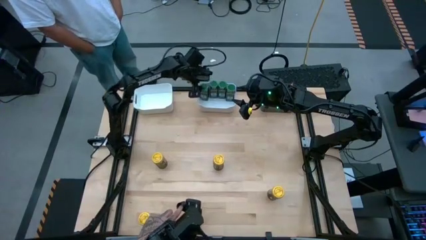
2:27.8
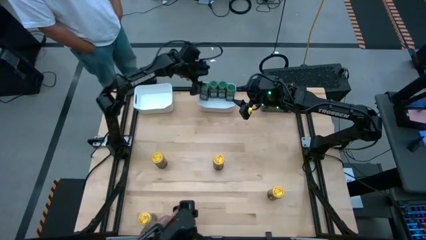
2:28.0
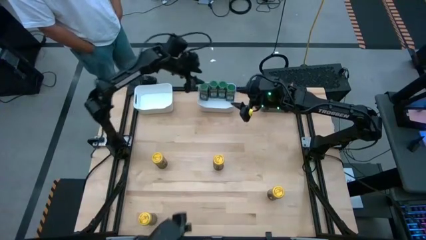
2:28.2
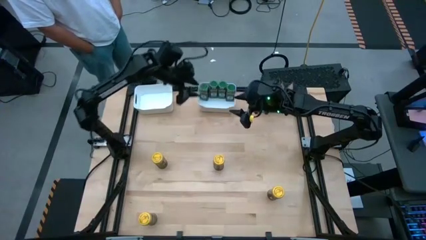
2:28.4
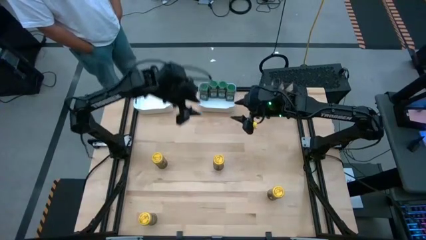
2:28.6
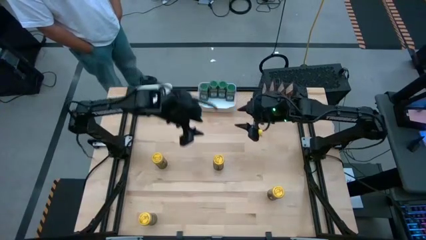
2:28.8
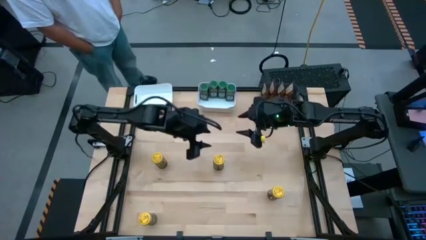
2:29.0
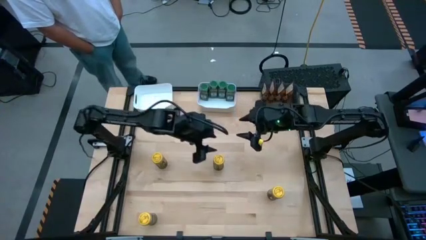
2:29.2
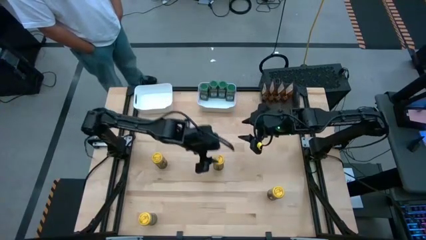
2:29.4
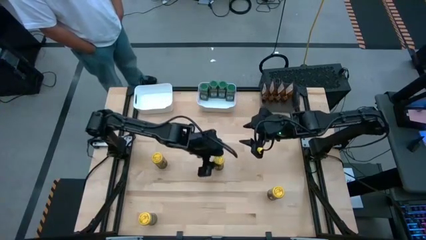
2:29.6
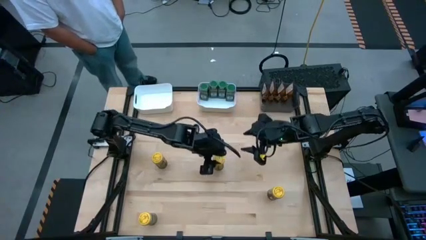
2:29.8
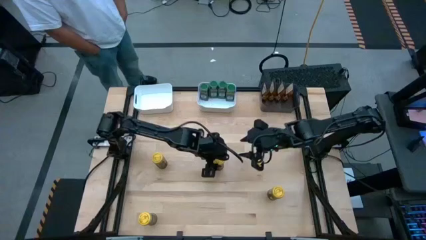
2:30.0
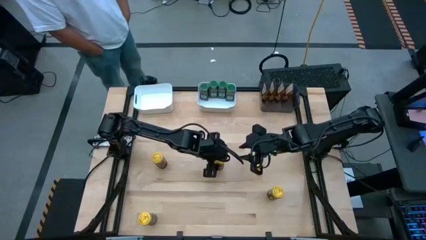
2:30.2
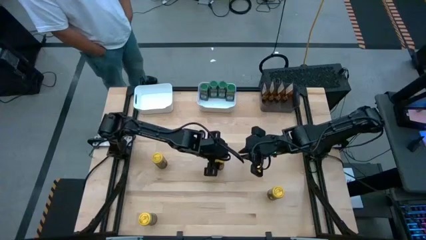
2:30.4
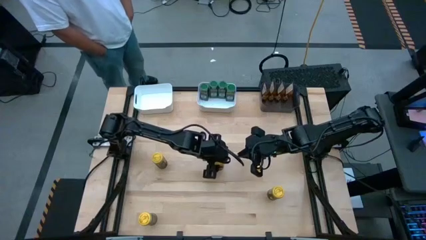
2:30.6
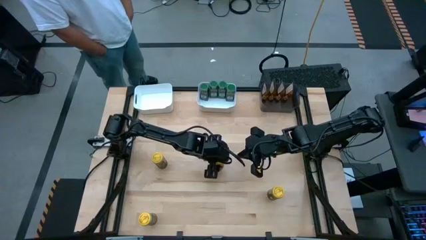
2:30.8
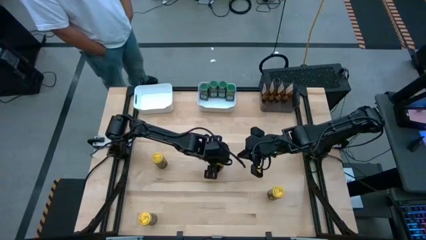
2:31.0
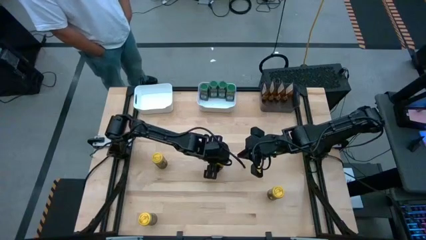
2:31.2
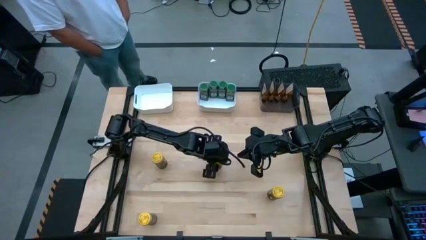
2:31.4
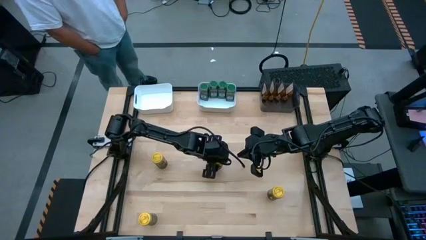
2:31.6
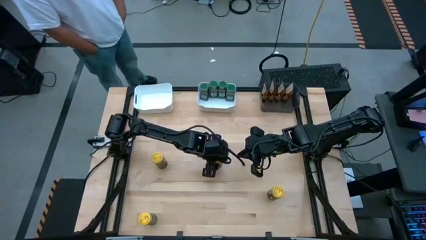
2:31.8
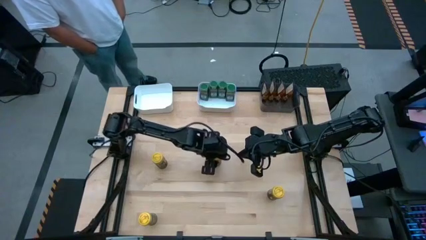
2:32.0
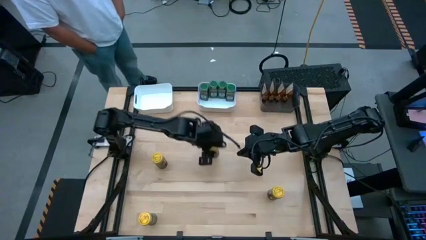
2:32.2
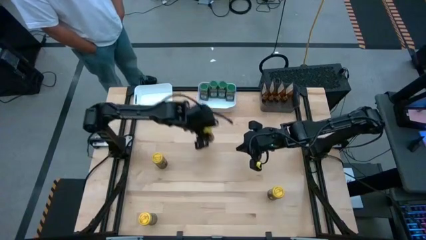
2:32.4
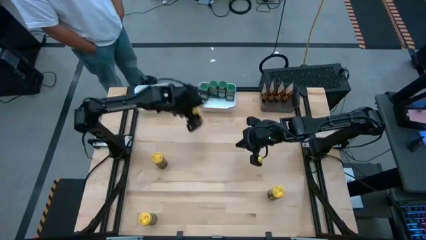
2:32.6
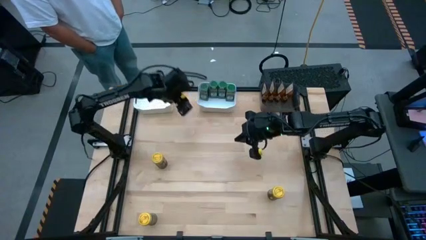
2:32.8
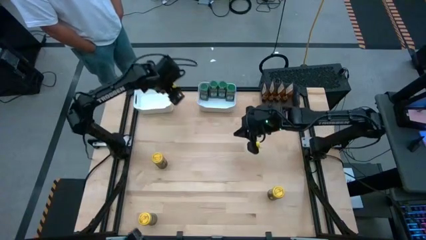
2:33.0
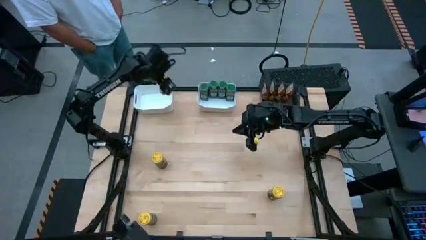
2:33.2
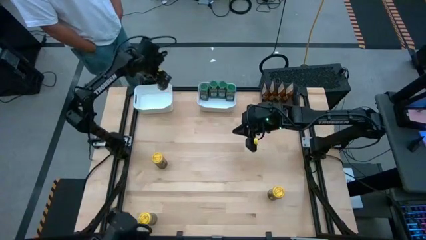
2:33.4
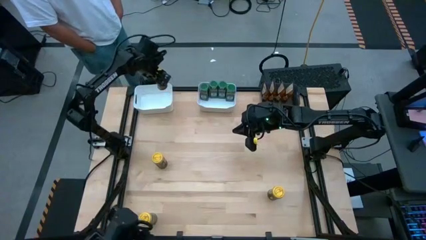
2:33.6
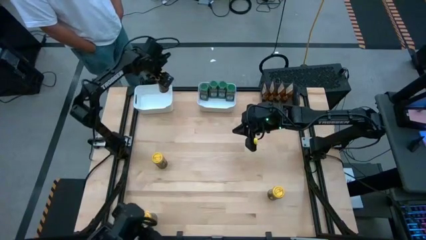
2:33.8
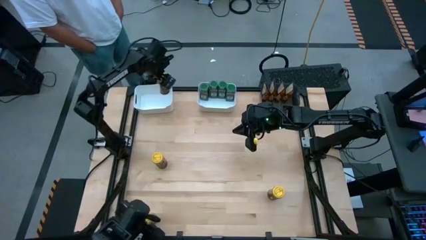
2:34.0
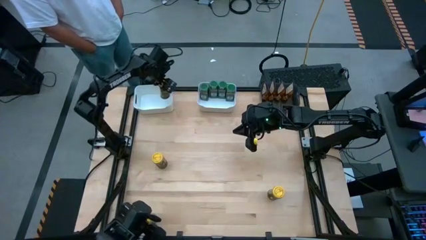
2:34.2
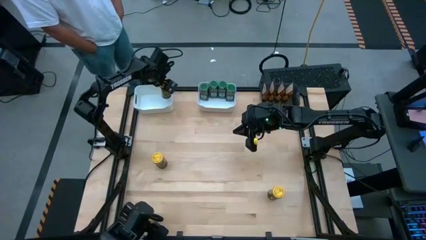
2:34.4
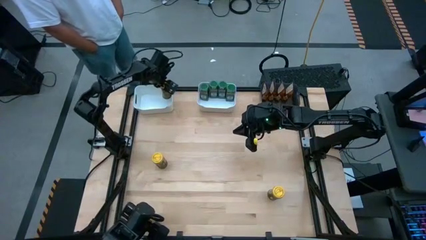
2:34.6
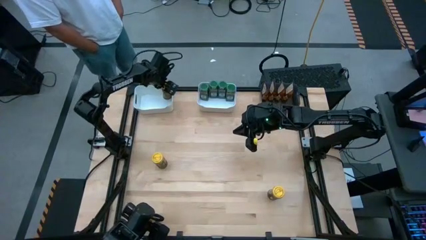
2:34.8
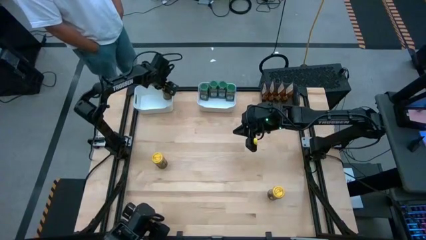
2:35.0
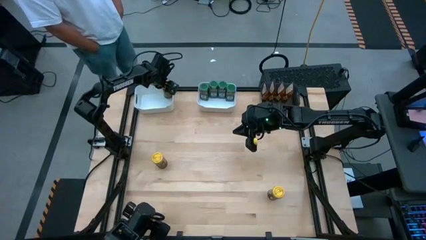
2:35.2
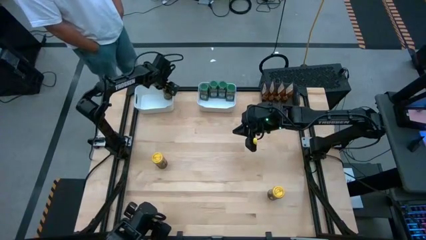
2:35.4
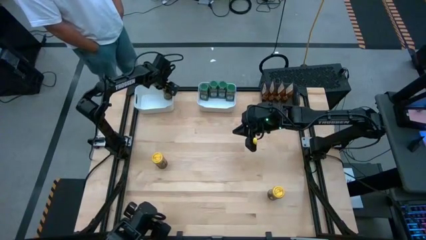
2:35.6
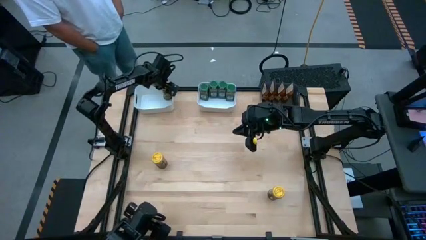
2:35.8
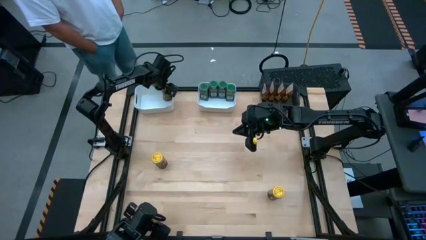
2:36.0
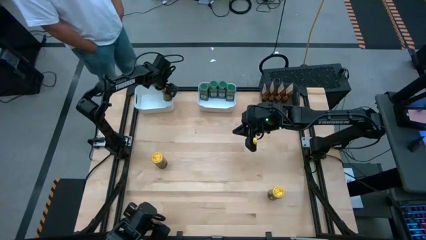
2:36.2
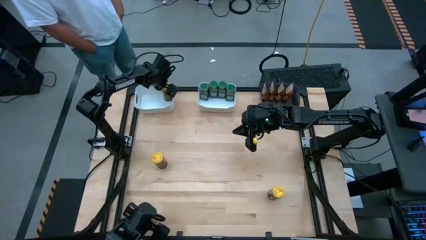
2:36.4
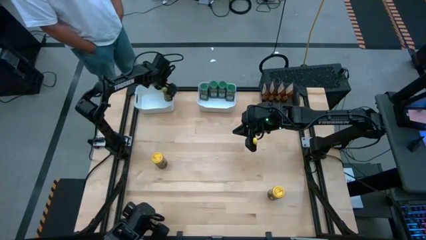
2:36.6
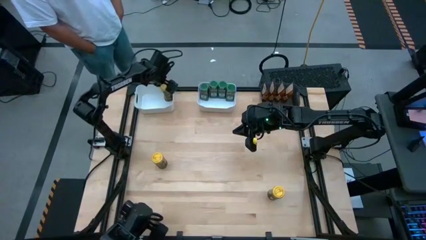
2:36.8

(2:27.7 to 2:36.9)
Task: Sort spices by type
Put the top right yellow seasoning bottle into the left white bin

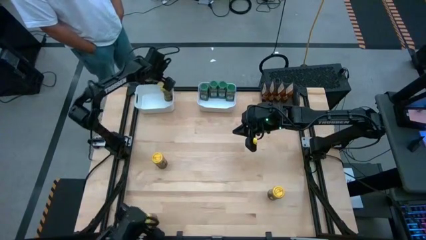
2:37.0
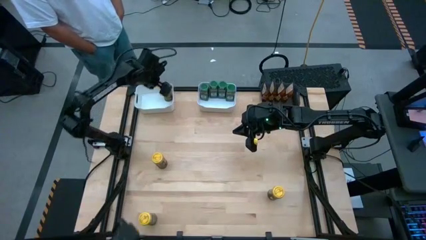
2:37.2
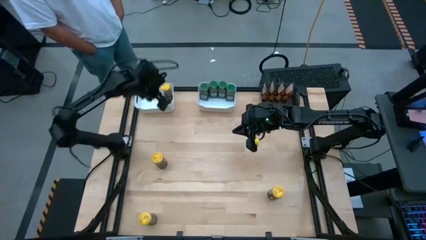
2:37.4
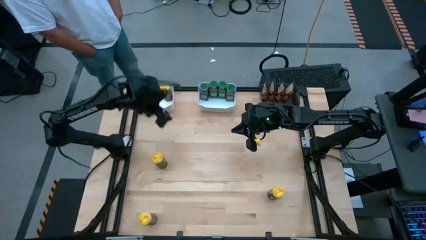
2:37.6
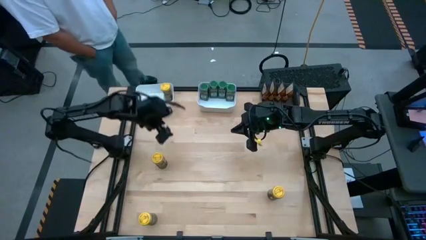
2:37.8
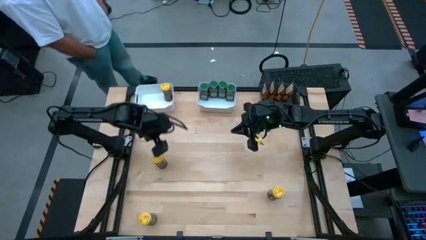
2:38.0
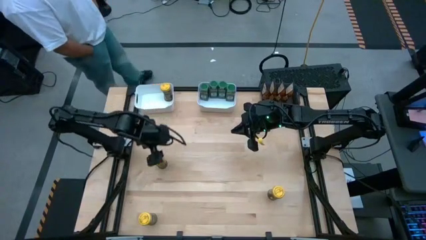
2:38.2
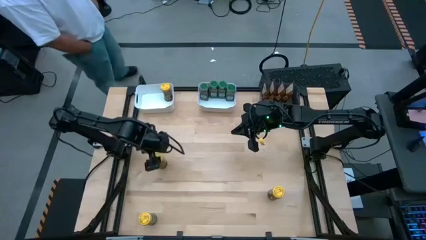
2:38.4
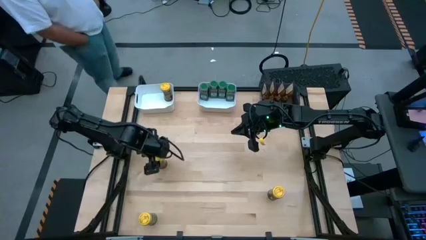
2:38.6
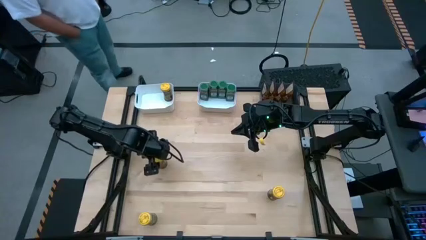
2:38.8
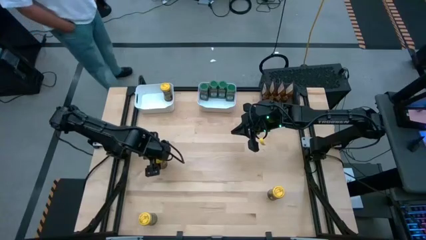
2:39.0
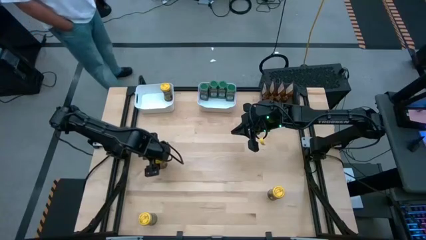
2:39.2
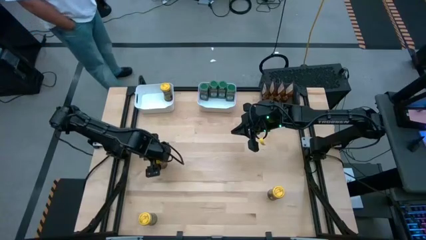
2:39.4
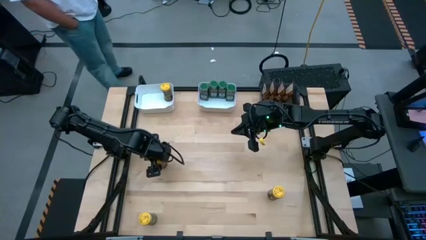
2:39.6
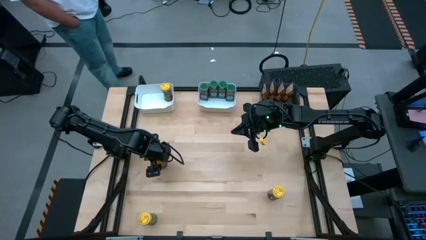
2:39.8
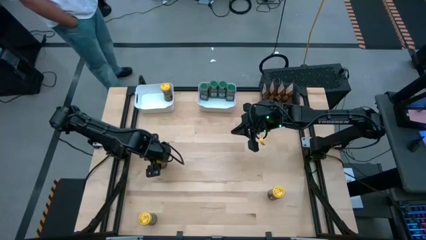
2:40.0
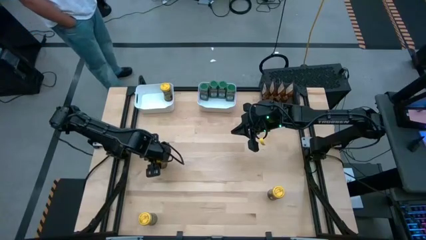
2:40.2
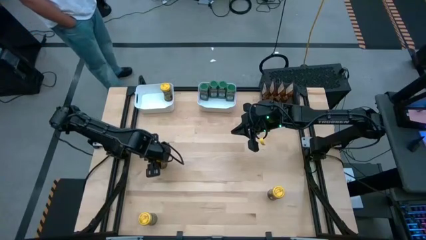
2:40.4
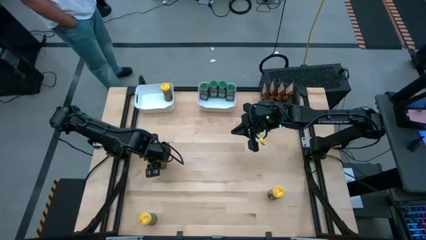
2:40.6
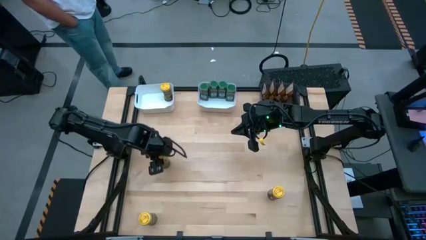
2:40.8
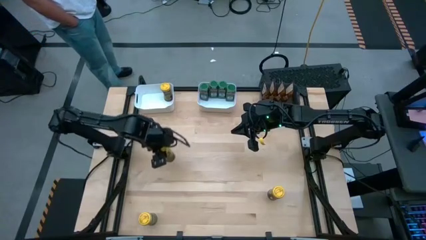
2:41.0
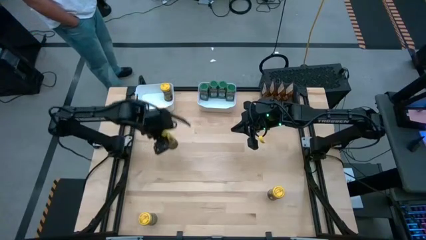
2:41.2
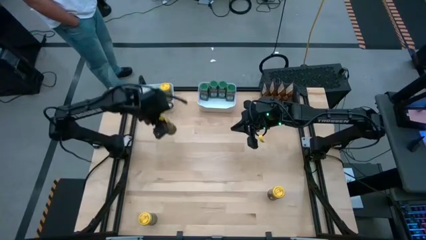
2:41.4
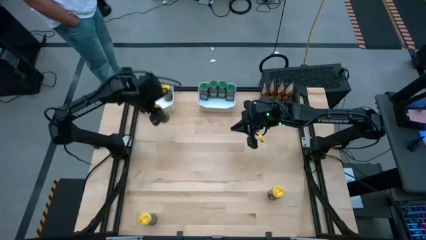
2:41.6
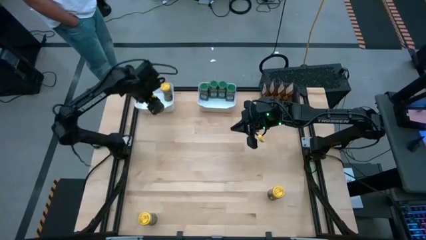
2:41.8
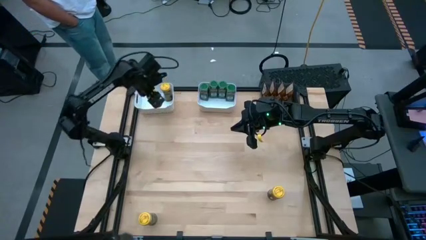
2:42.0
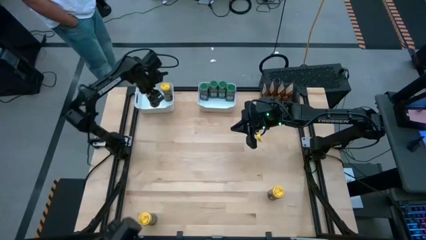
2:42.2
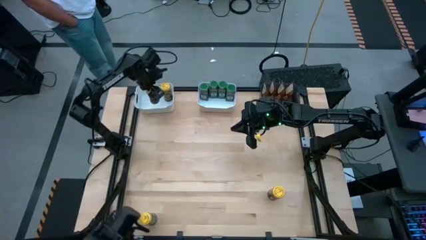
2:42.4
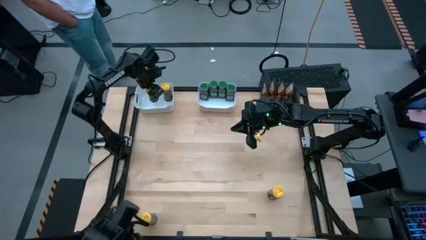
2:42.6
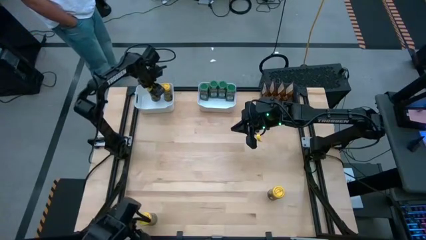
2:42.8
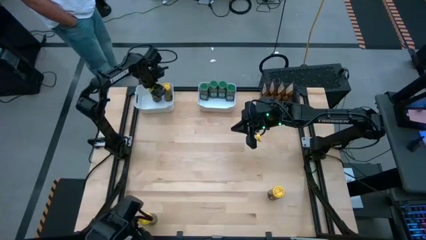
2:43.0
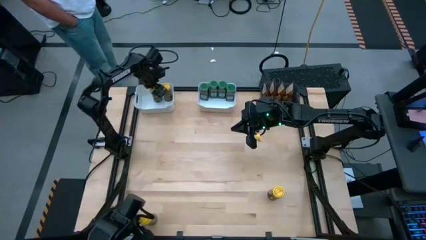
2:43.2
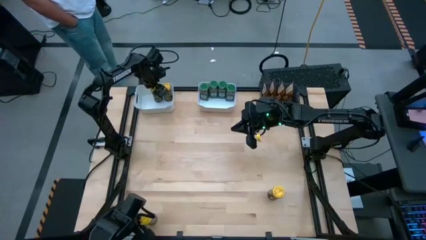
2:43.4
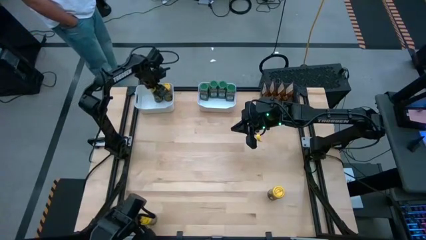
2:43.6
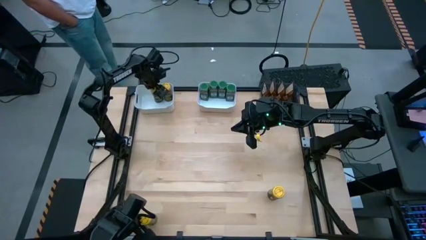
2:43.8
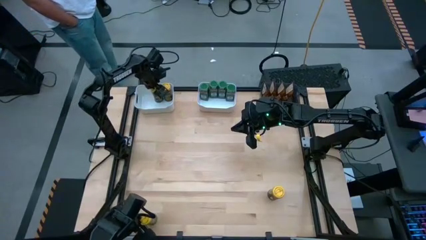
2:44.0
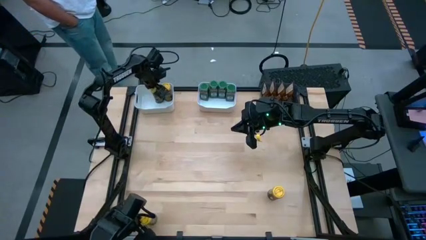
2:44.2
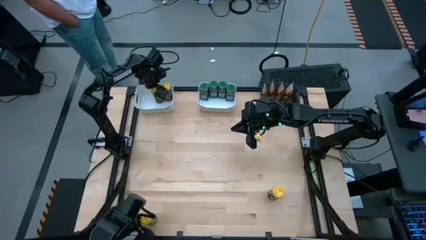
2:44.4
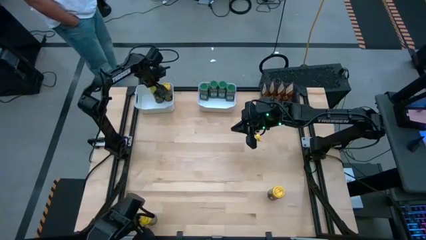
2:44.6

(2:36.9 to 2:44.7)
Put the top left yellow seasoning bottle into the left white bin
